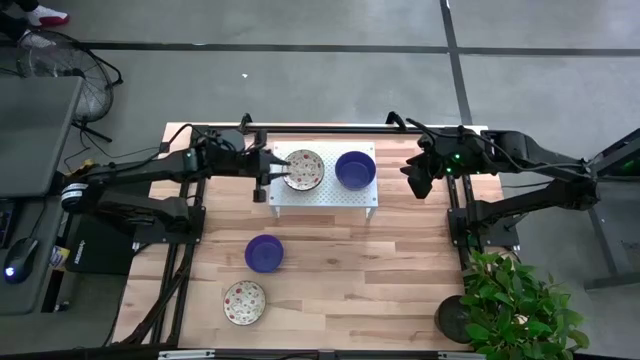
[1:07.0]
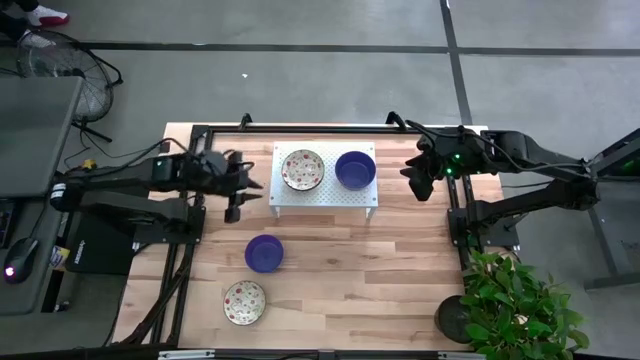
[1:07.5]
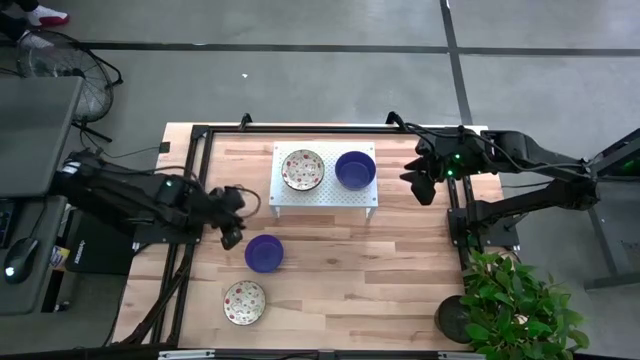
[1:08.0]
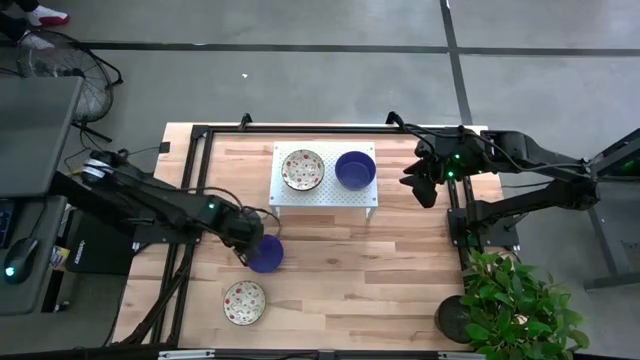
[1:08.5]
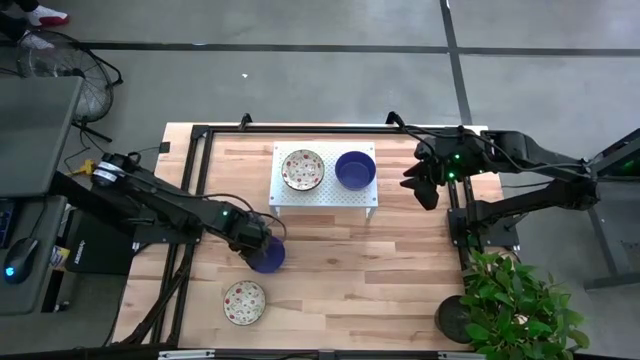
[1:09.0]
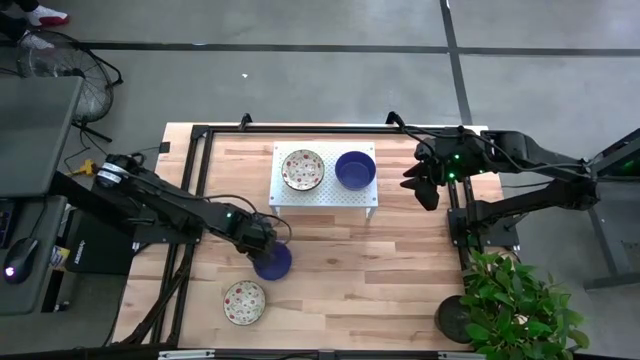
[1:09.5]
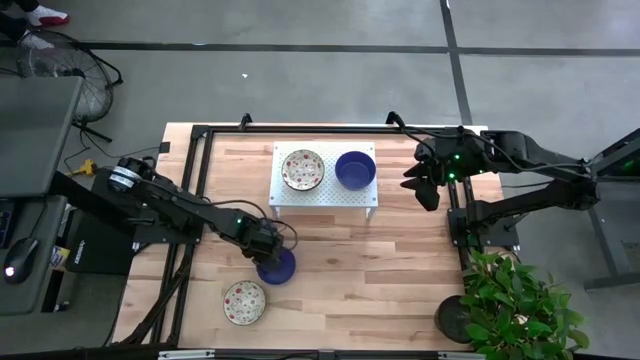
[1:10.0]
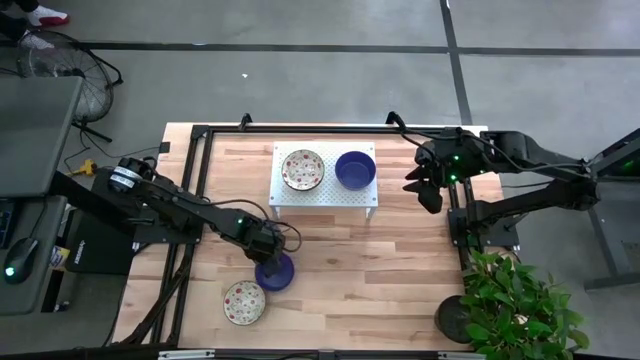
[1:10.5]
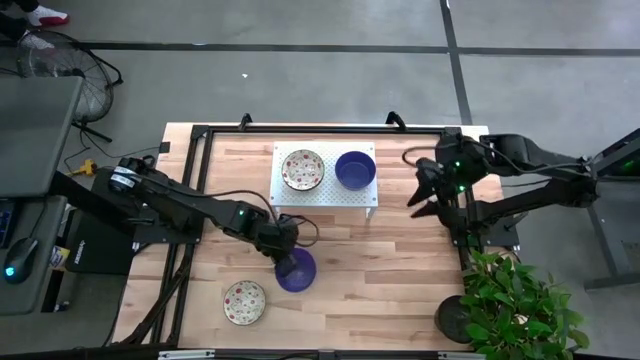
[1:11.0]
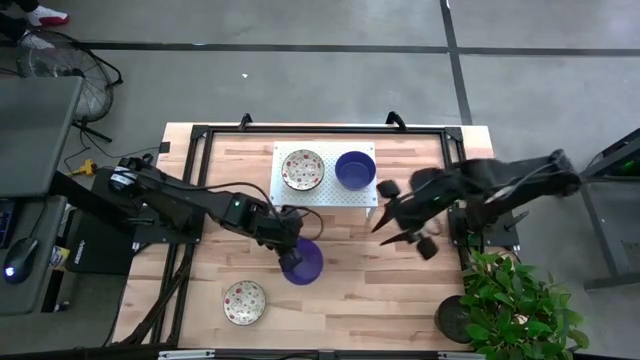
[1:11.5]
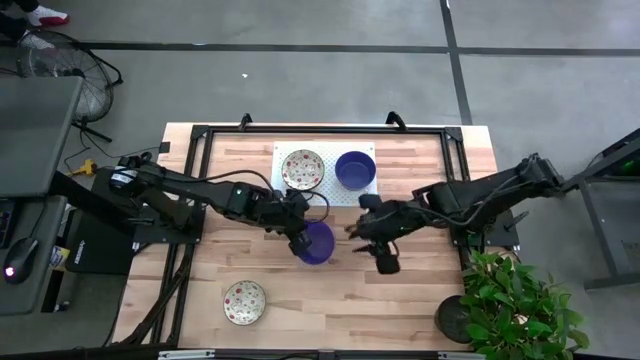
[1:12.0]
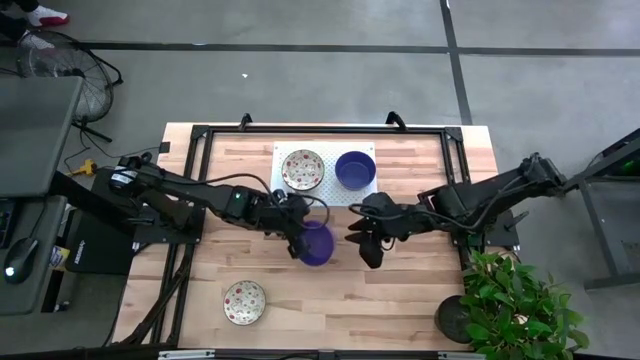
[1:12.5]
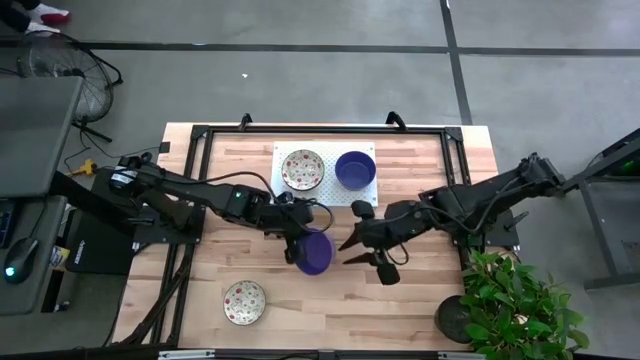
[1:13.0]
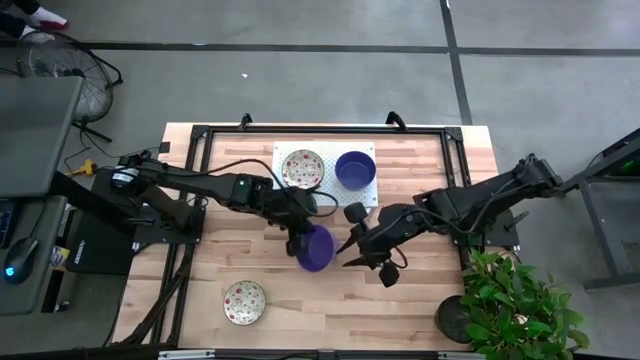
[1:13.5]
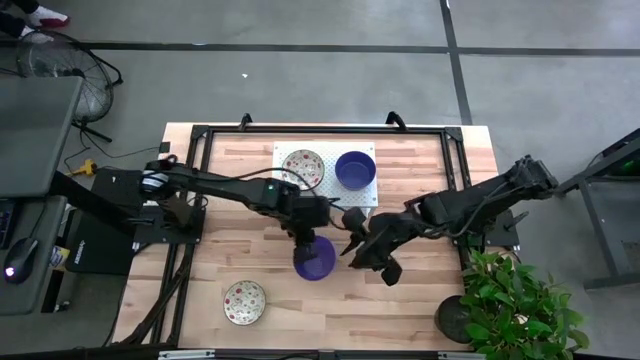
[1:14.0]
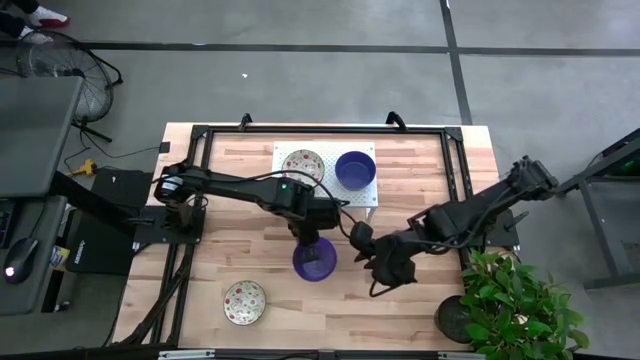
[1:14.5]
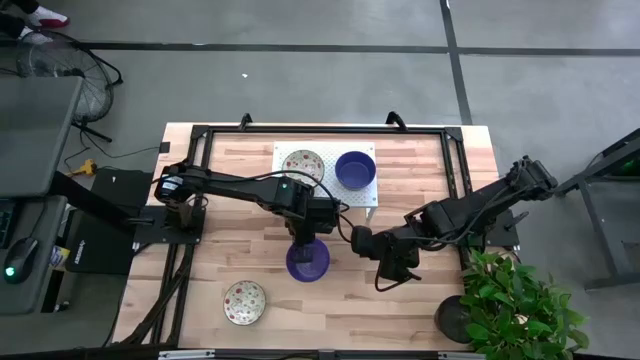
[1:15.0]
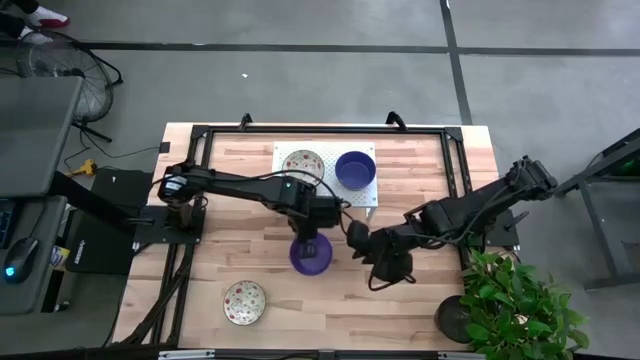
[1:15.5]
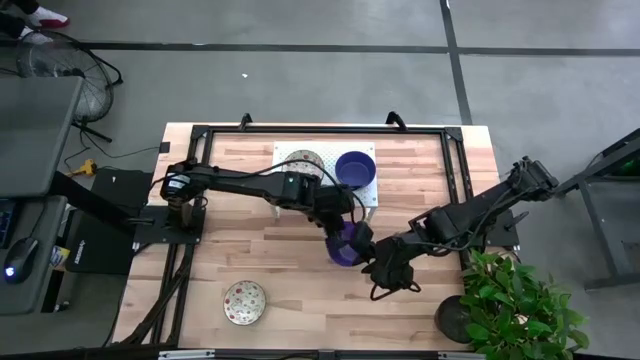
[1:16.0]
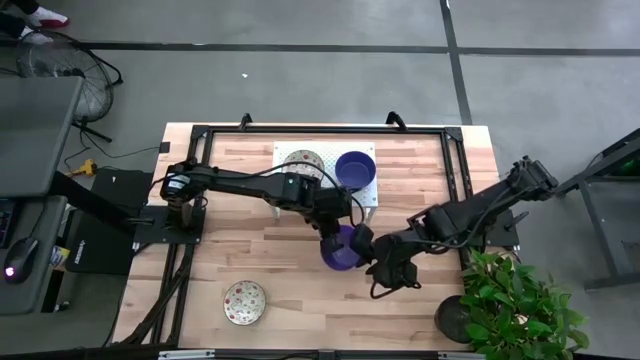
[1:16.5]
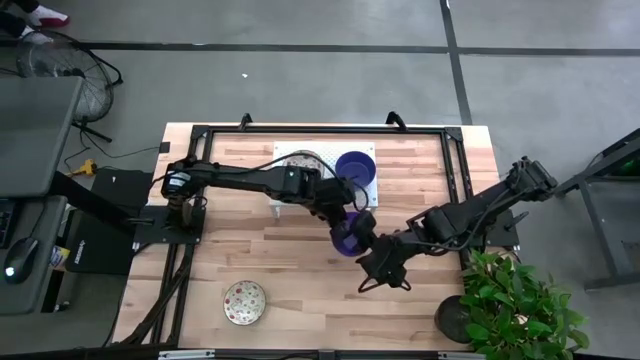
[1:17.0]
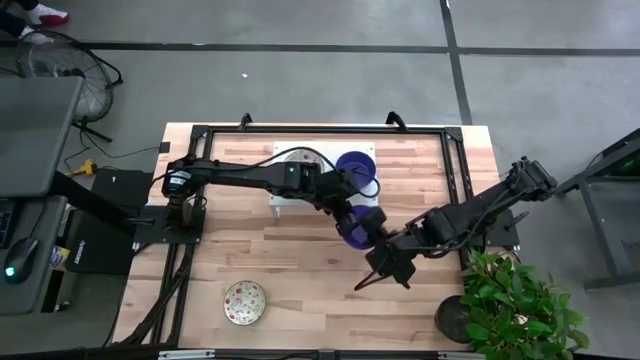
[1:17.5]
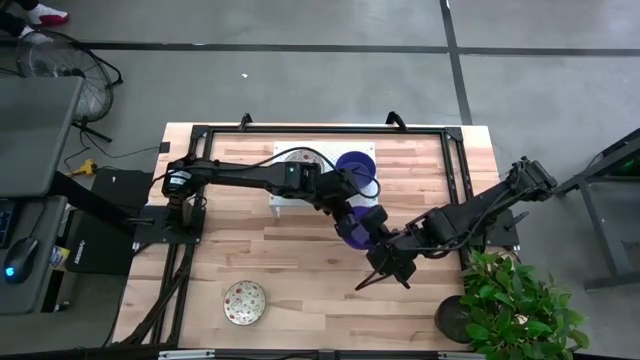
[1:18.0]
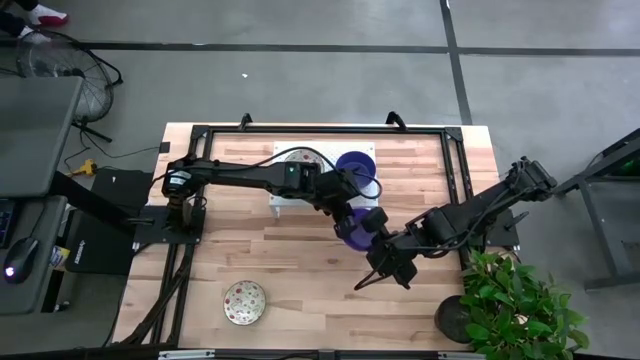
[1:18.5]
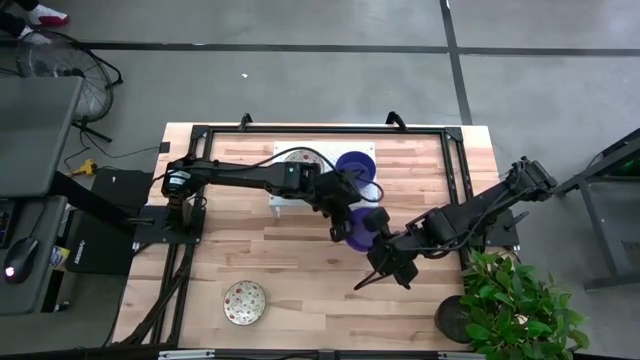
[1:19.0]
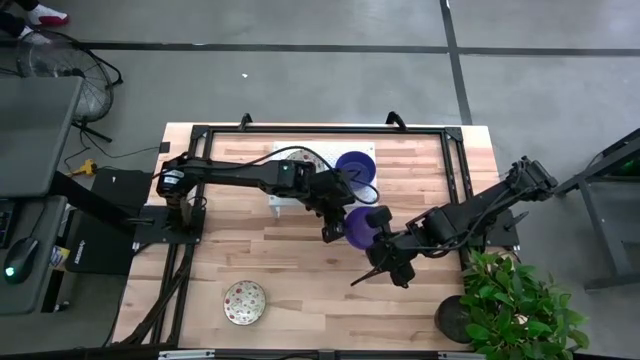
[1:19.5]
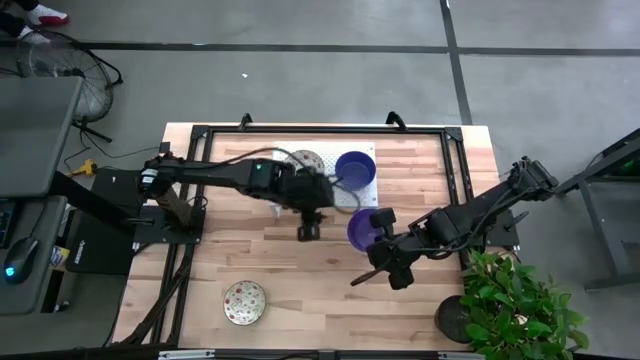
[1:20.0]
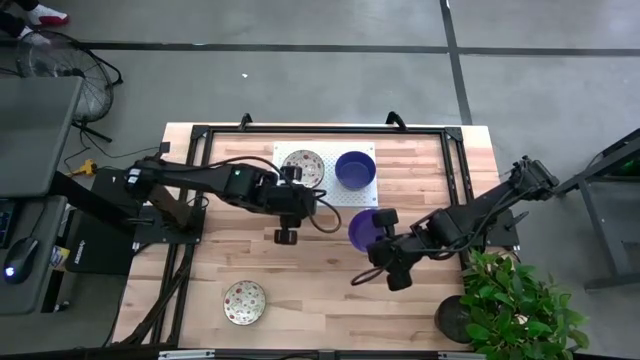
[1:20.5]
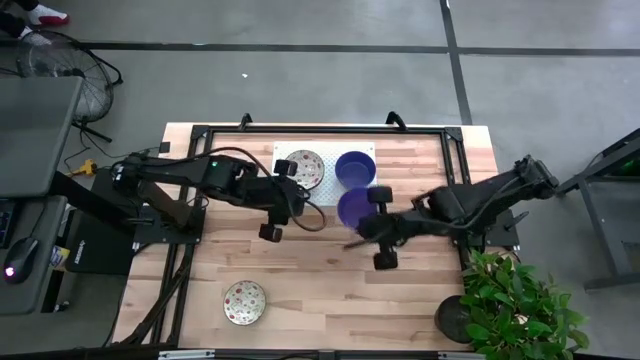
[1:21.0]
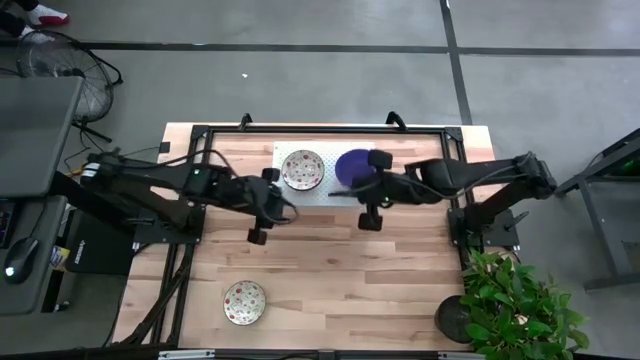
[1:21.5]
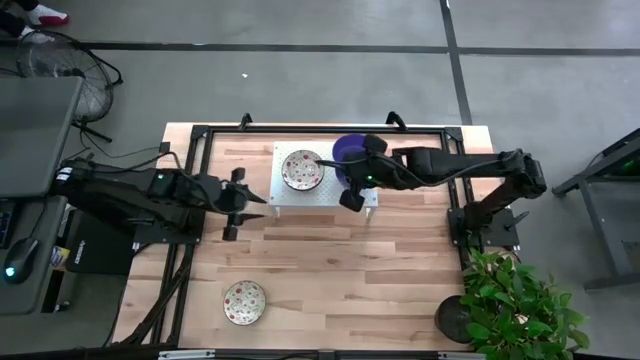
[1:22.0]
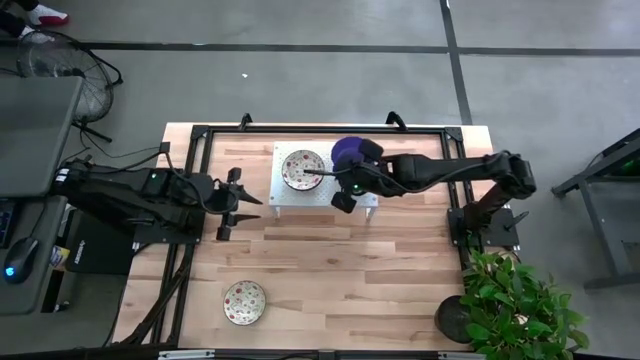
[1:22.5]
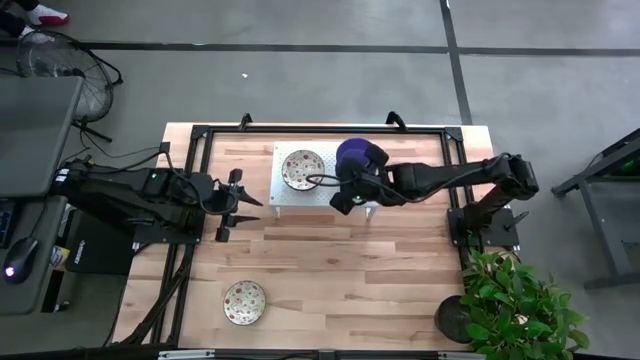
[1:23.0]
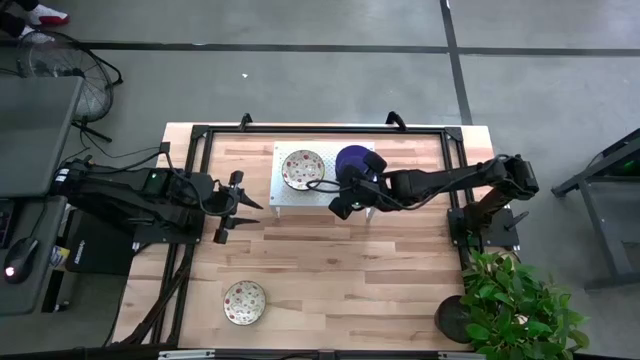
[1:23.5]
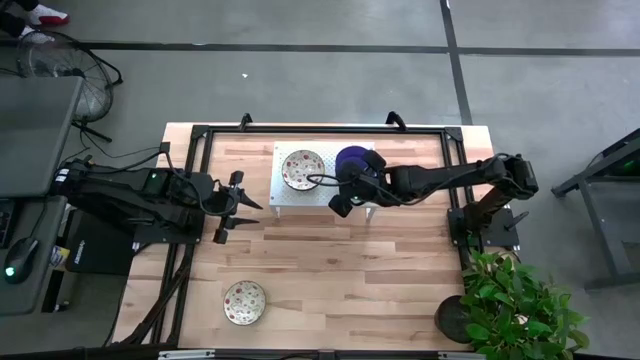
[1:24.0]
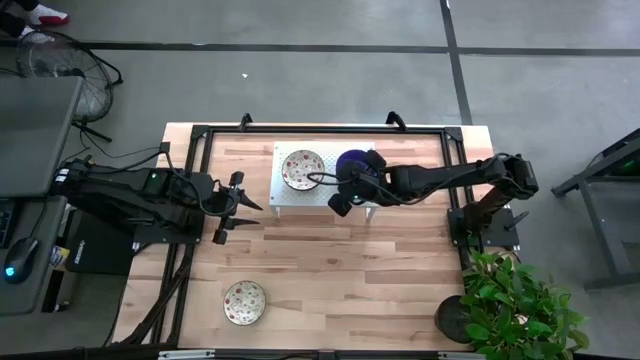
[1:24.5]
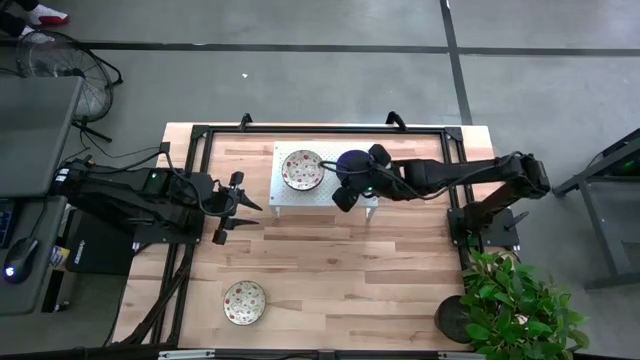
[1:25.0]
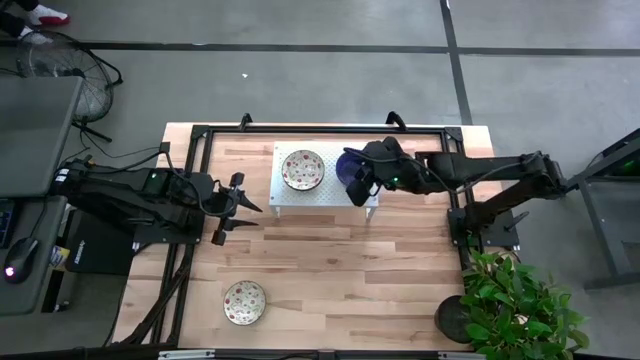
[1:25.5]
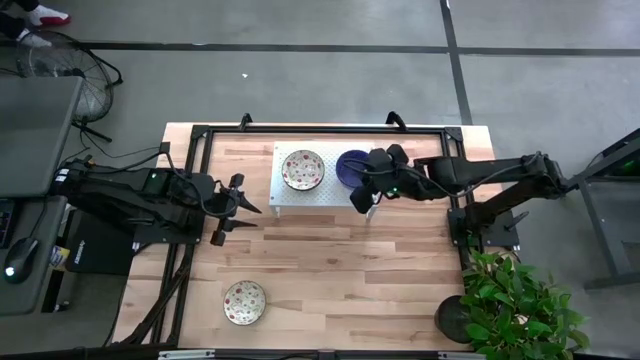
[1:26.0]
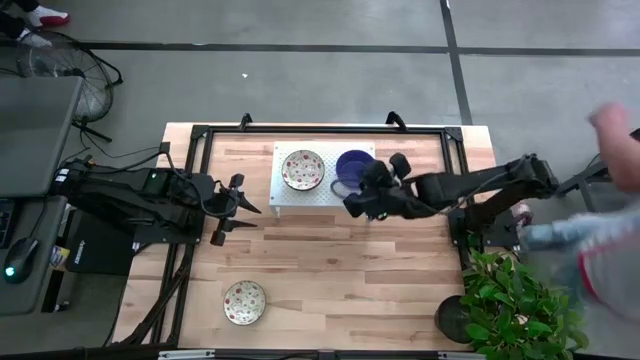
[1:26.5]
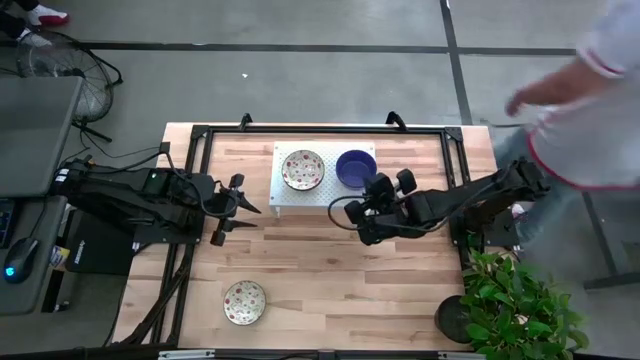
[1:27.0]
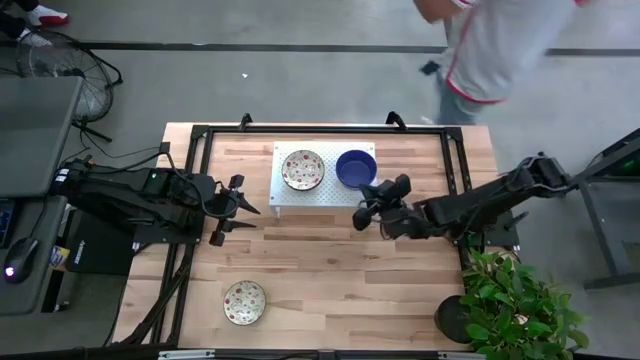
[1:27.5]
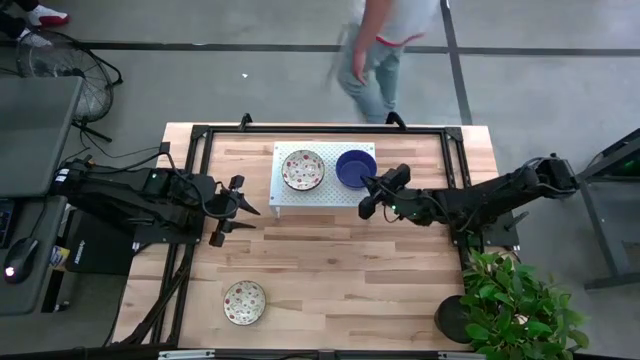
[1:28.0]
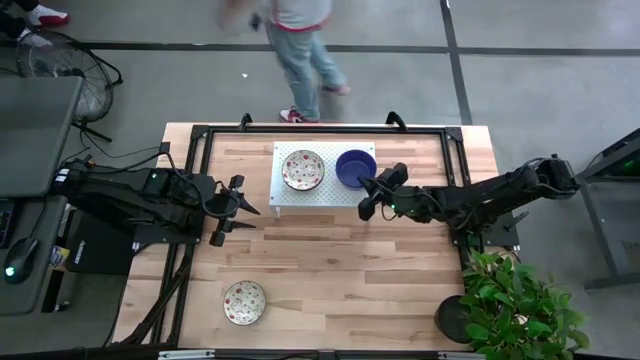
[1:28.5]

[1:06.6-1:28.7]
Task: Pick & Place Mini bowls
Stack the blue bowl on top of the blue bowls on the shelf
